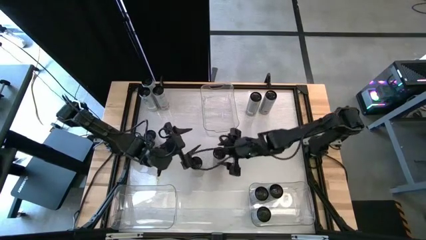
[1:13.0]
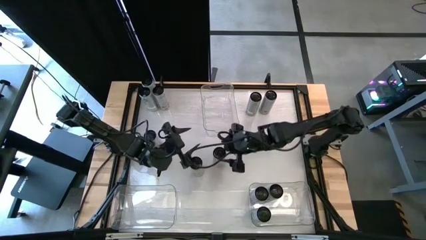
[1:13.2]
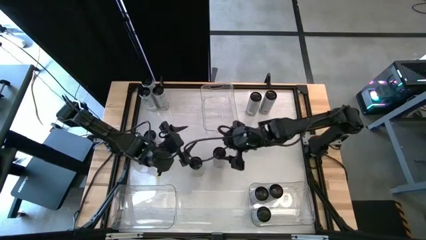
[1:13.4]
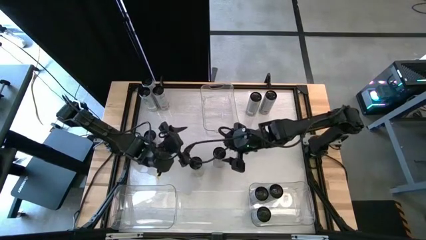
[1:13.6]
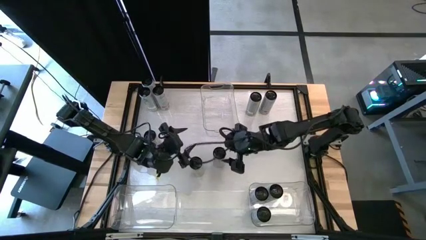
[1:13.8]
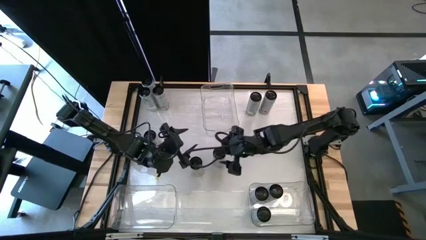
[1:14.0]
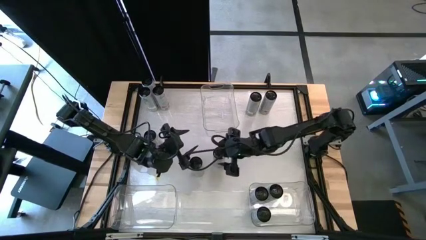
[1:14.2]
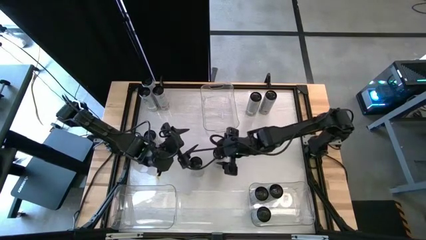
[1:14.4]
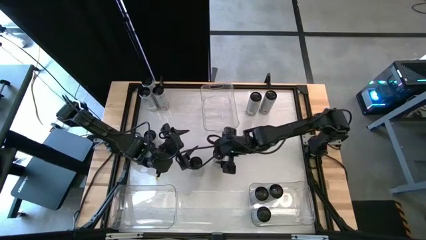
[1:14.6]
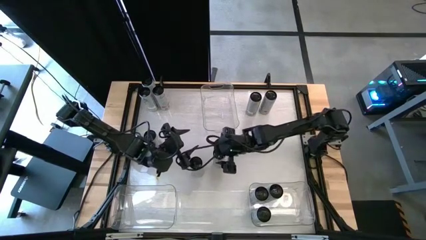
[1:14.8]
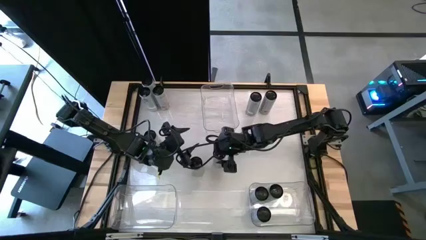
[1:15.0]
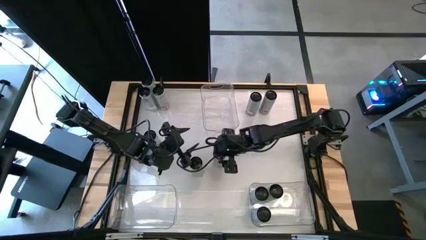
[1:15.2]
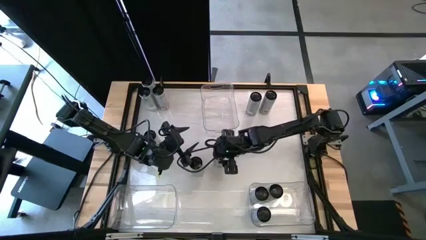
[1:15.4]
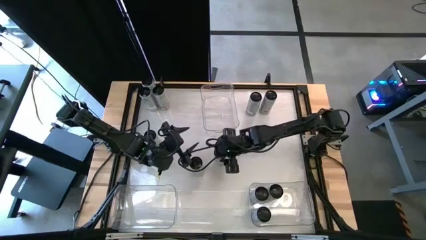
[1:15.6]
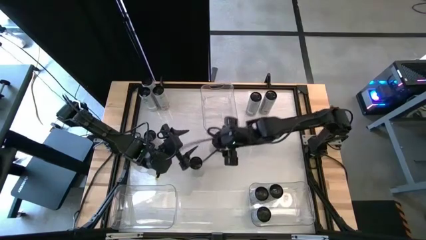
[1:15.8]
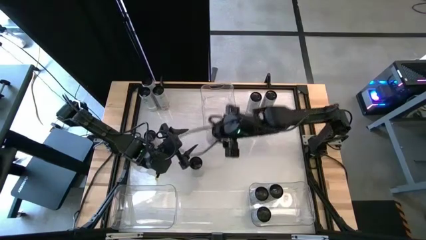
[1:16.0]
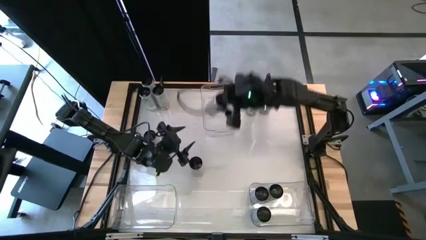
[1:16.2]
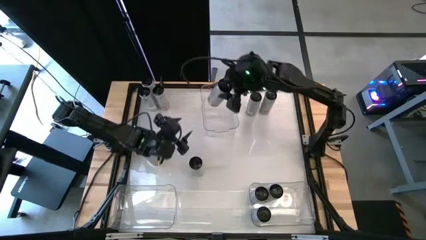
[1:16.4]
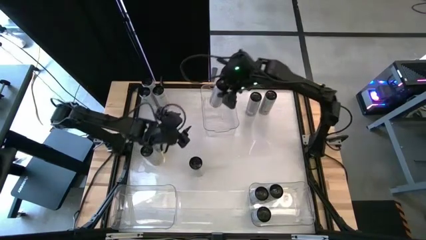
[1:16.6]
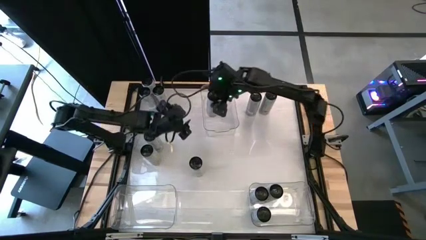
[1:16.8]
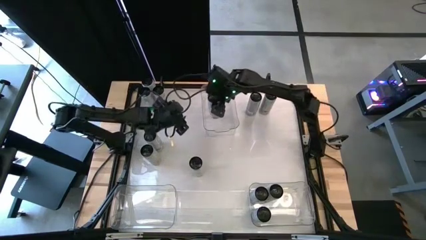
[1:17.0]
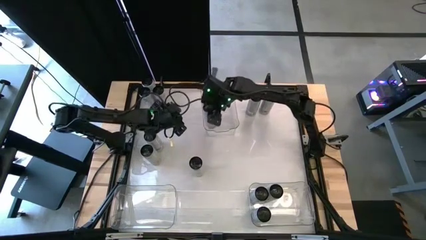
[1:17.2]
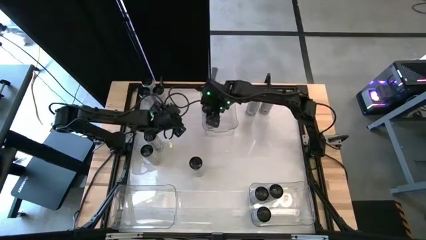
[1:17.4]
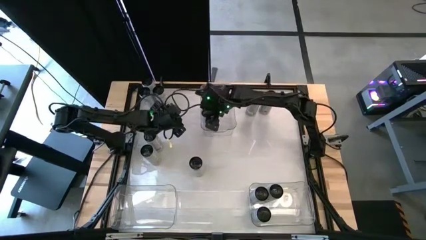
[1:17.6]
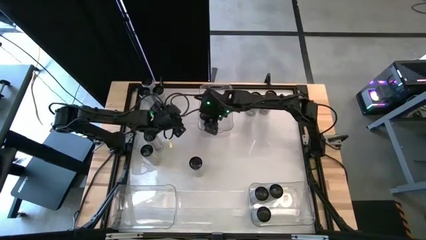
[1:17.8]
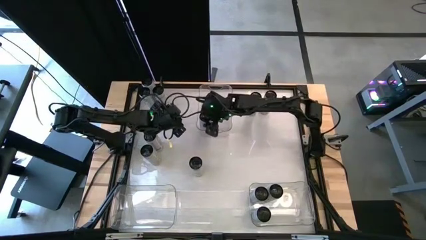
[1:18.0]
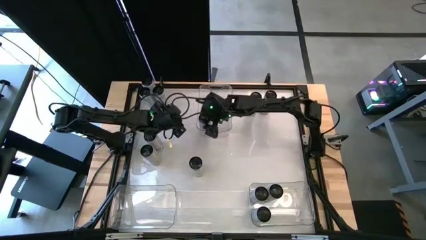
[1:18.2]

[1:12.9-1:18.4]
Task: Sort soda cans
Put the bottom right white yellow soda can into the top middle transparent bin

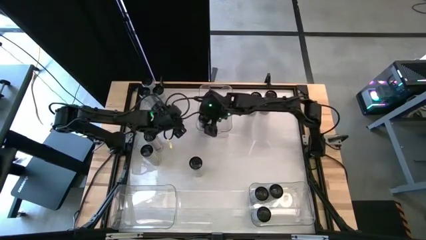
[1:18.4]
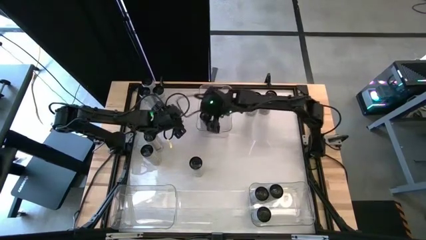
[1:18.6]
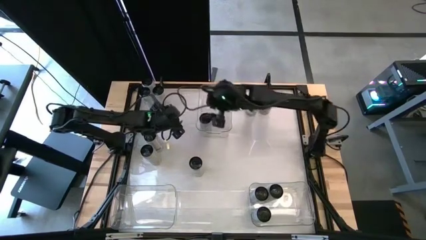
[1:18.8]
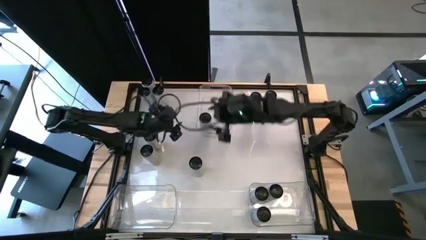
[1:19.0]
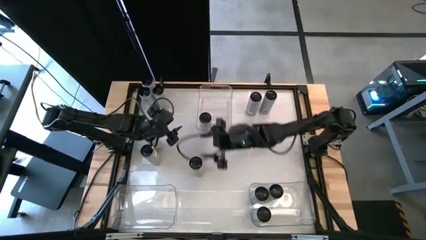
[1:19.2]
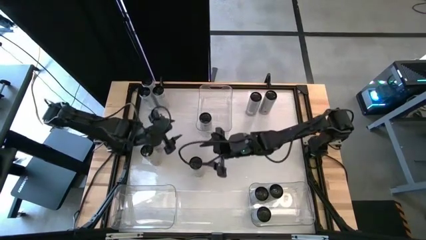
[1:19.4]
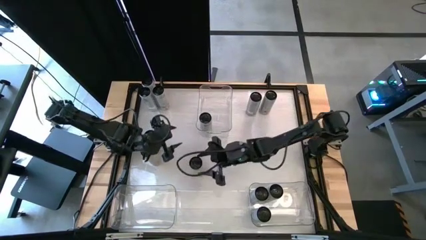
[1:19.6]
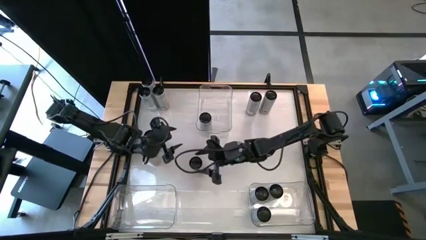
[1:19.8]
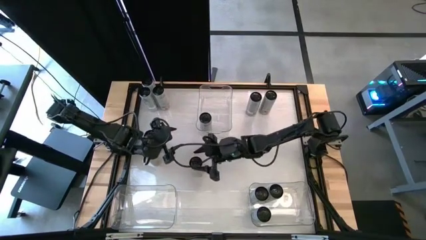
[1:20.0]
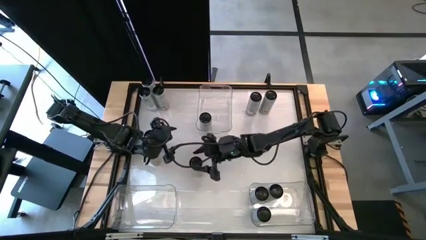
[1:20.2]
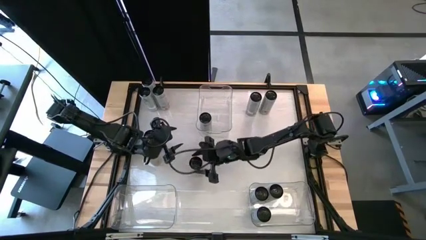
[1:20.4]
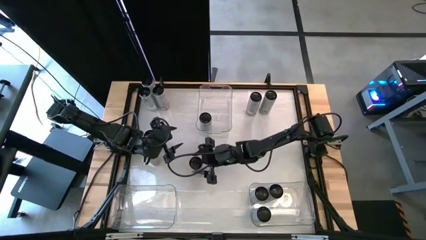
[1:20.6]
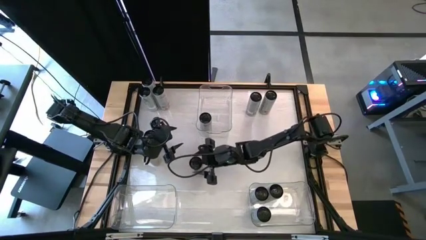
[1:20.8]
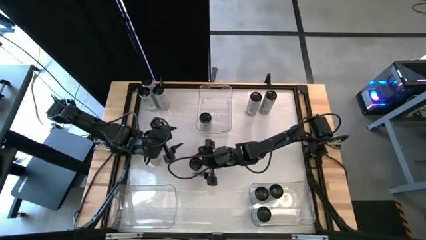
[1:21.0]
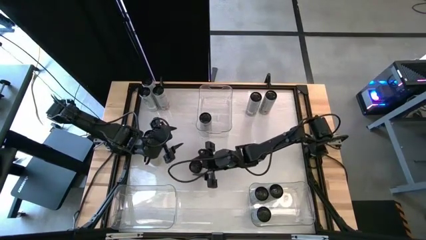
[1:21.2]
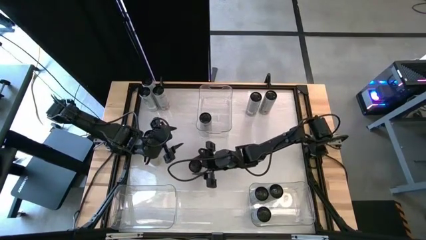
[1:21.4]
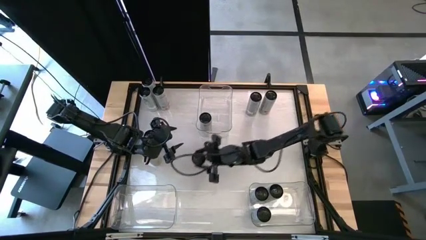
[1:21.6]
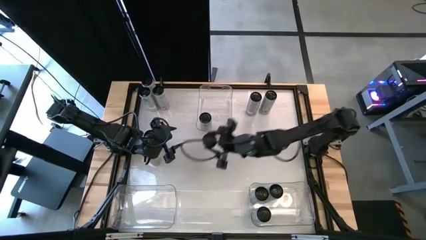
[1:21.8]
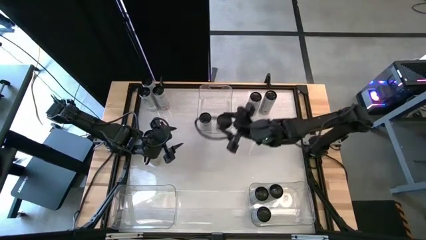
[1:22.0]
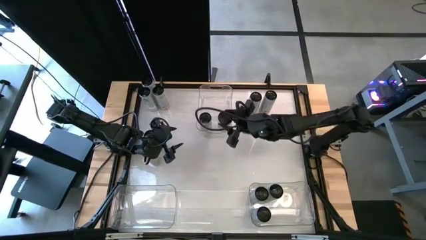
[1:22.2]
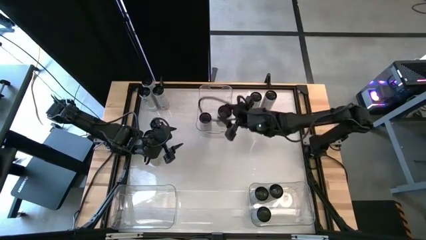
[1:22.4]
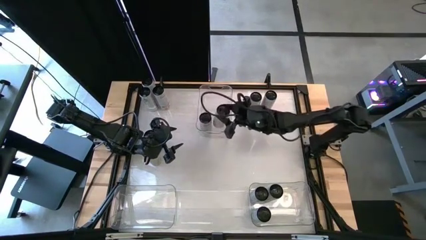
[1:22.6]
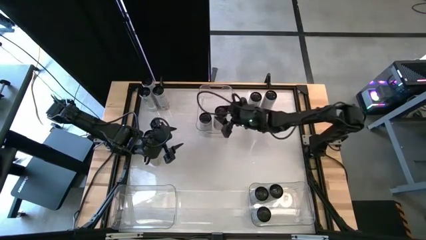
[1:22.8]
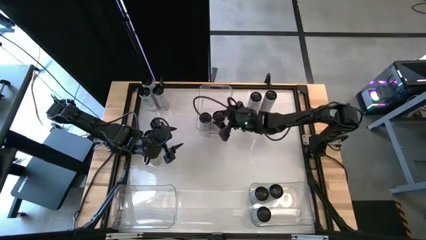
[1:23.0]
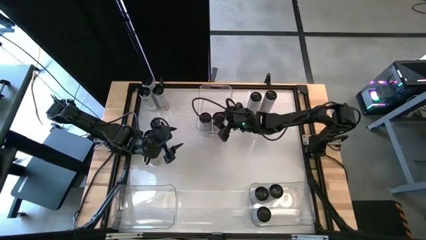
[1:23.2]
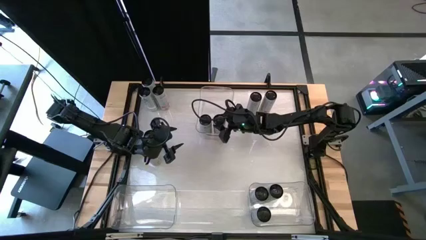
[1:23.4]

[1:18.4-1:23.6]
Put the bottom right white yellow soda can into the top middle transparent bin
